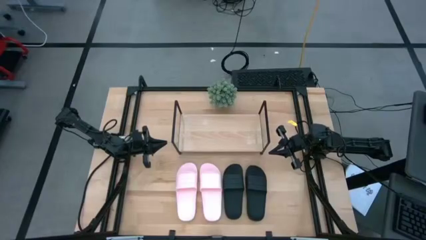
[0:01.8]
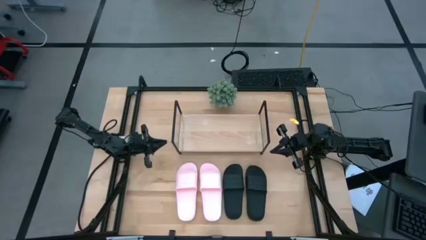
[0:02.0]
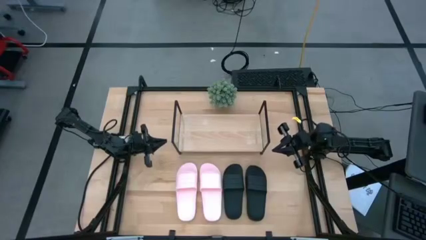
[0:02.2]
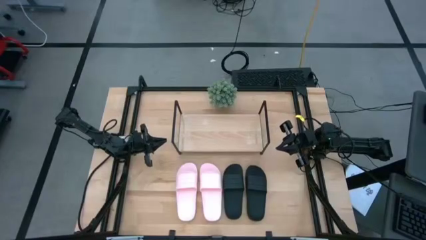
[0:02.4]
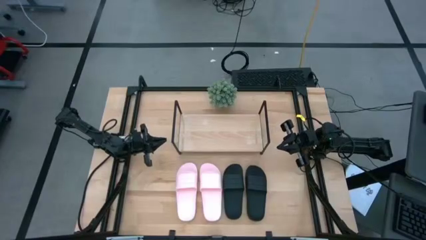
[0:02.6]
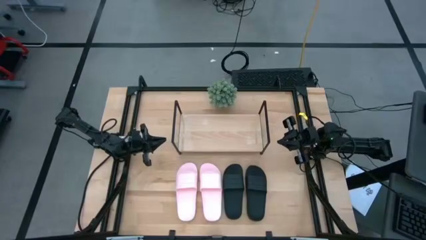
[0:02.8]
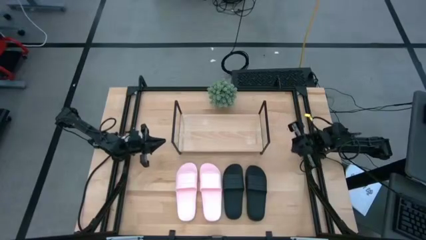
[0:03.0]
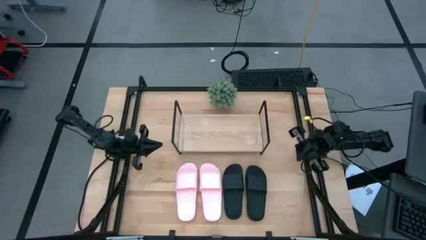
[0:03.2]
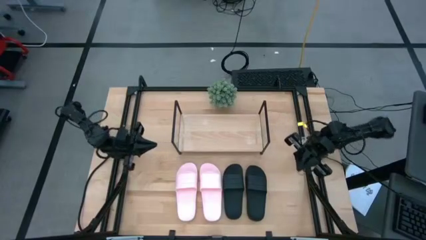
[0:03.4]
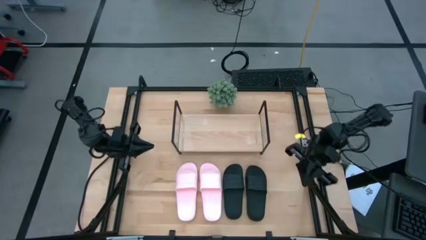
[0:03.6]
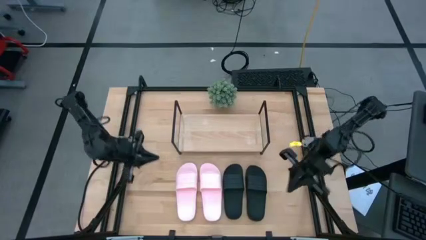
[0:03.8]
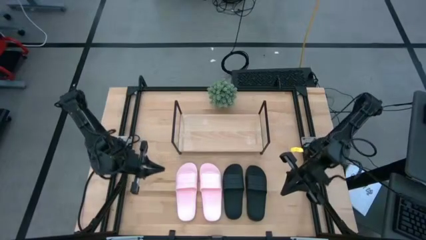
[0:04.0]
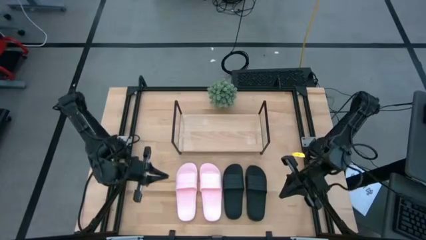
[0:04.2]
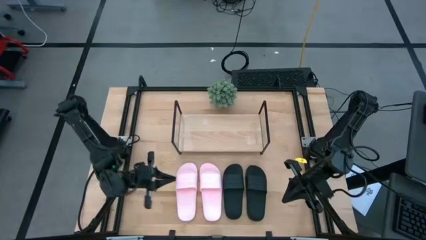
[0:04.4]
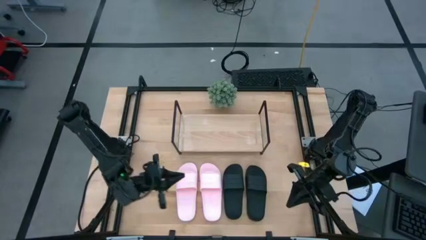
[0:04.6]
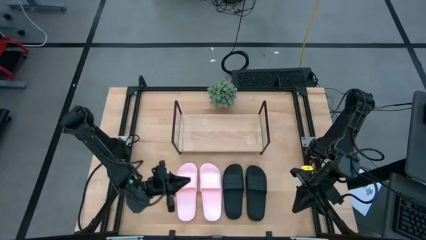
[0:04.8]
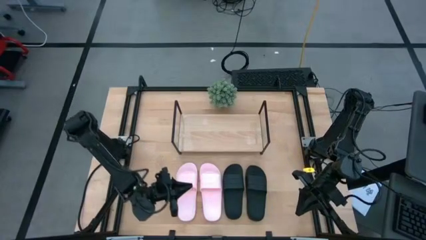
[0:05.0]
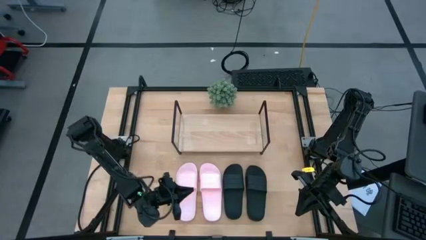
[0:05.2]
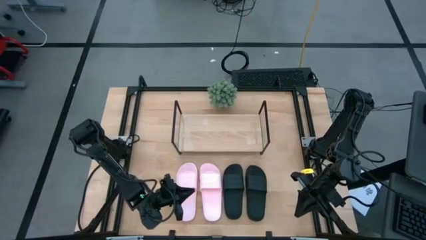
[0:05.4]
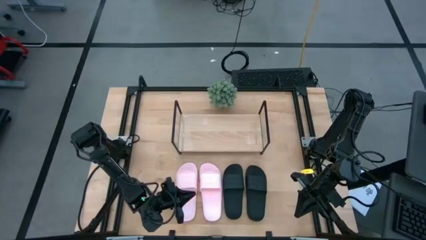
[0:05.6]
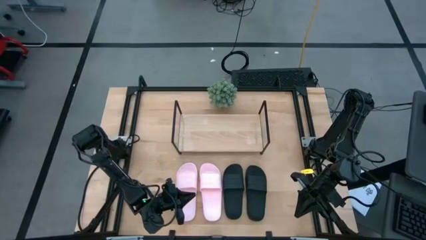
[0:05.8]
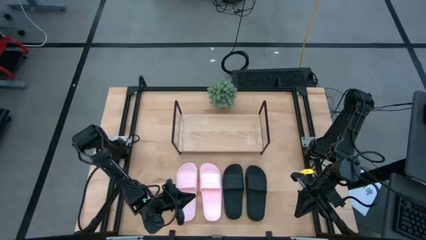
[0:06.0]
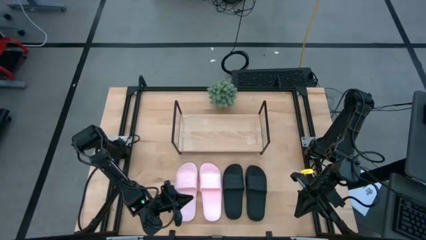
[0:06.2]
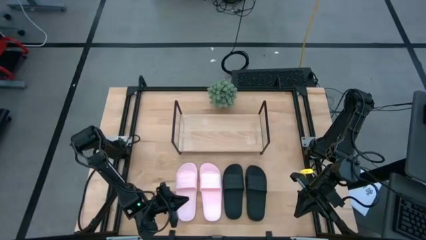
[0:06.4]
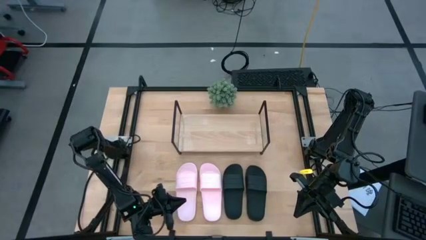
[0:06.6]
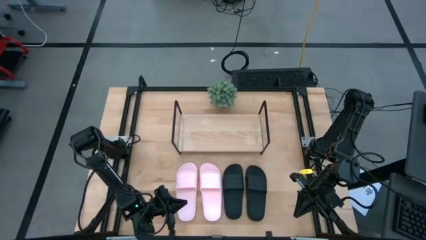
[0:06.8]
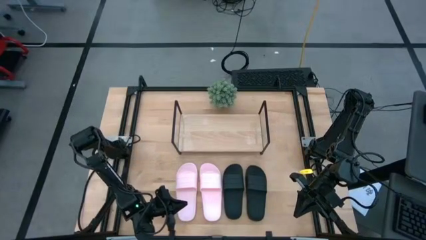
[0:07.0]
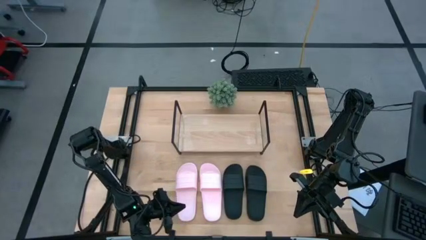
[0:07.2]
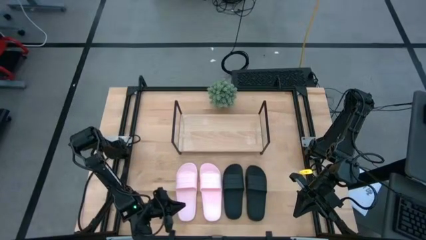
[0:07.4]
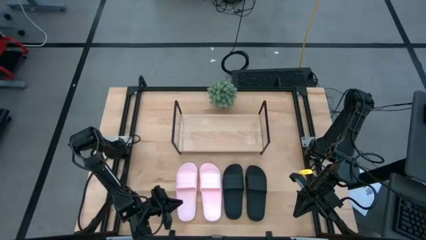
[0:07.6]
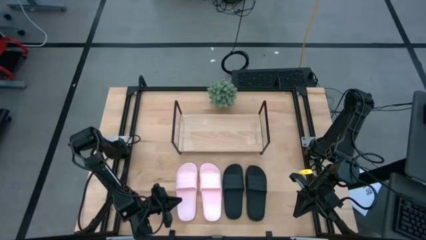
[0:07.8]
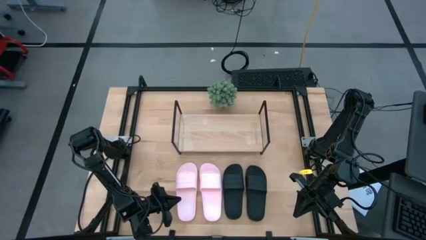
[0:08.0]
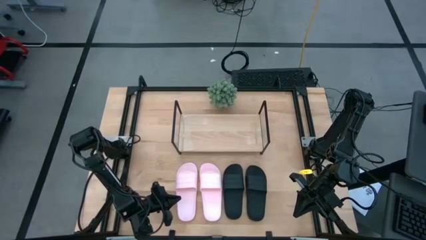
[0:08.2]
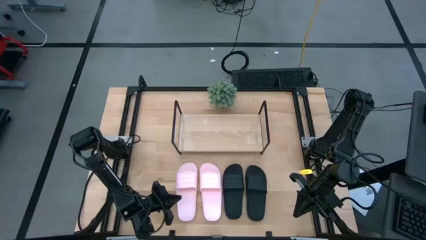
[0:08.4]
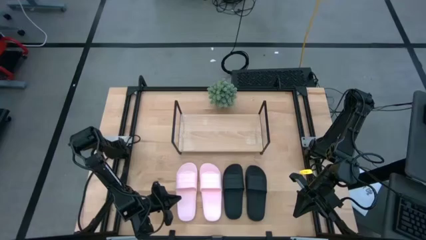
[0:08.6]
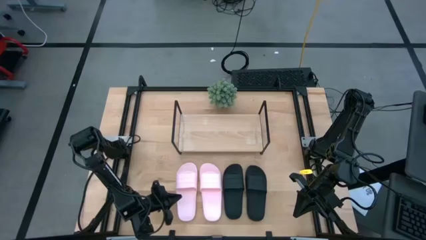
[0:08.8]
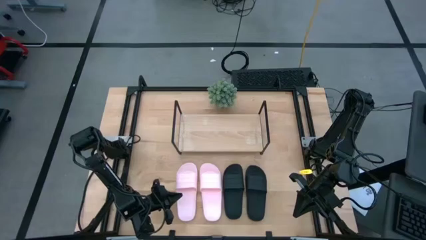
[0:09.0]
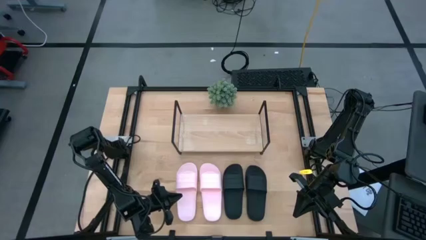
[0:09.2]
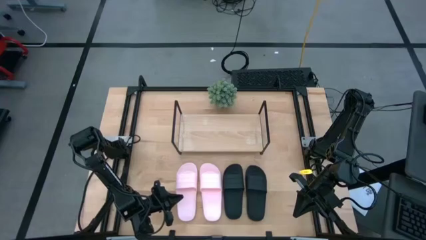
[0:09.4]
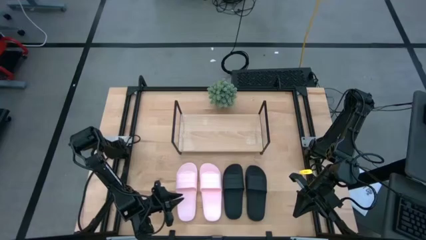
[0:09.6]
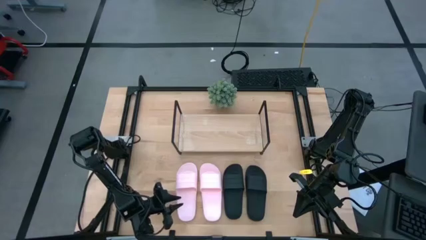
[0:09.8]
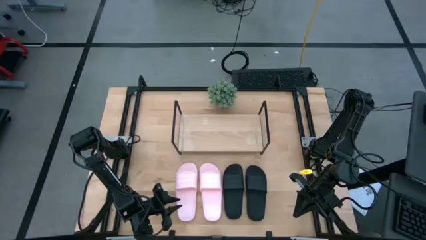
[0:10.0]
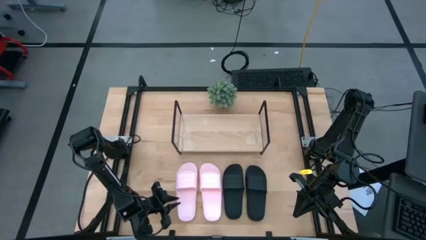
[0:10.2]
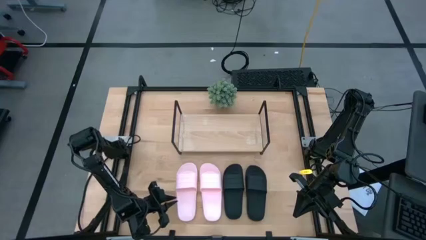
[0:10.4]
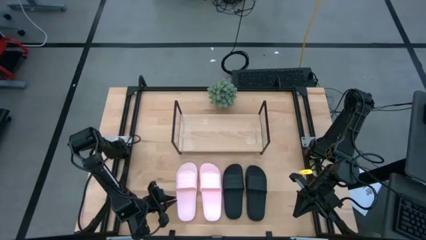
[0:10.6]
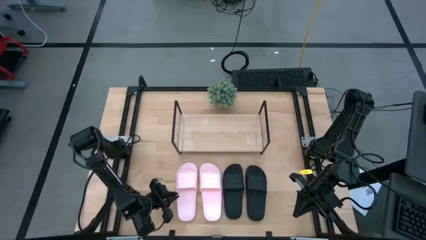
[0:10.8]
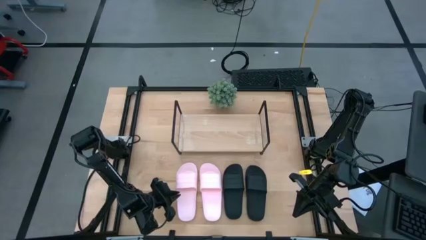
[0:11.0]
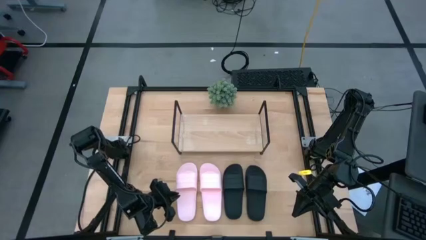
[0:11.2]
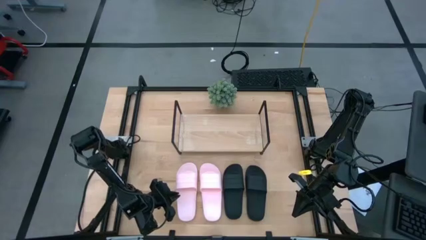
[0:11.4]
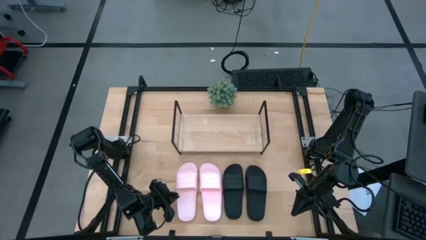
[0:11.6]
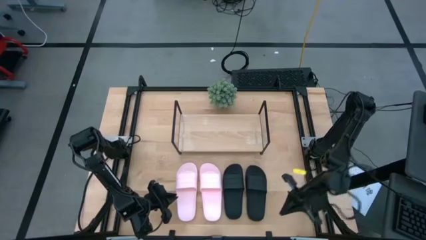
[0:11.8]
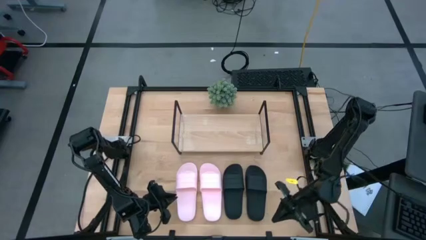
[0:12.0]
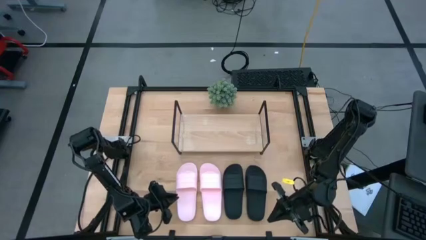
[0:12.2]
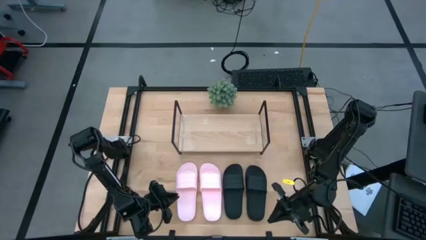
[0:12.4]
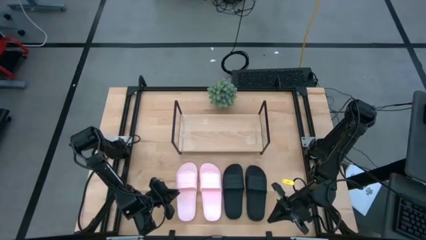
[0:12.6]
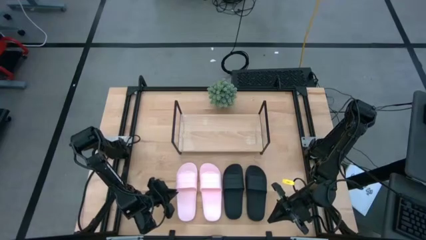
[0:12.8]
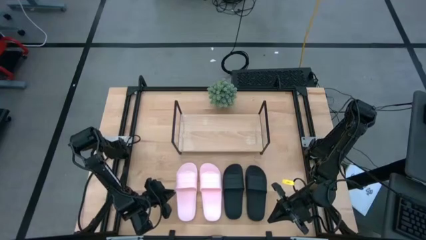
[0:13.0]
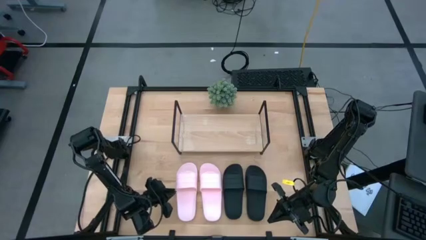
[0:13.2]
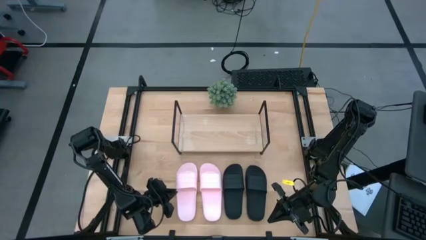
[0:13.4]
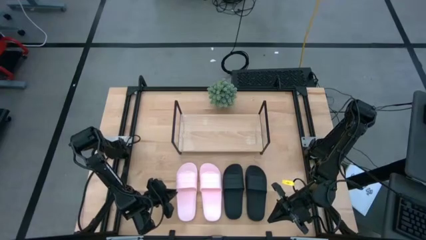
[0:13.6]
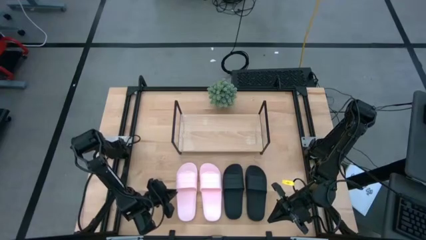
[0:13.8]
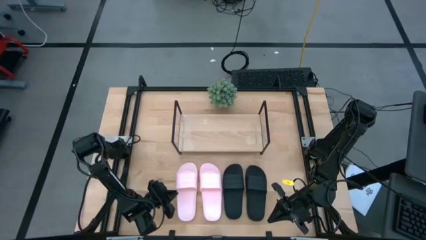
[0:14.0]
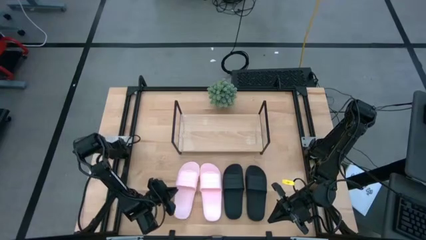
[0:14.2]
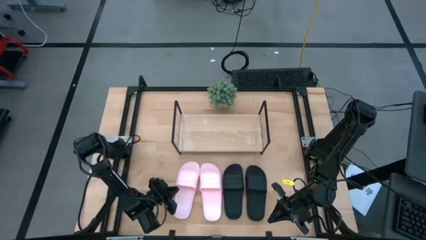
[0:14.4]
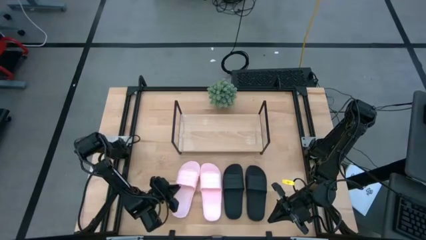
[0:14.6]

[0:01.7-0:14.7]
Task: Pick and place slides into the shelf
Put the pink slide on the shelf
